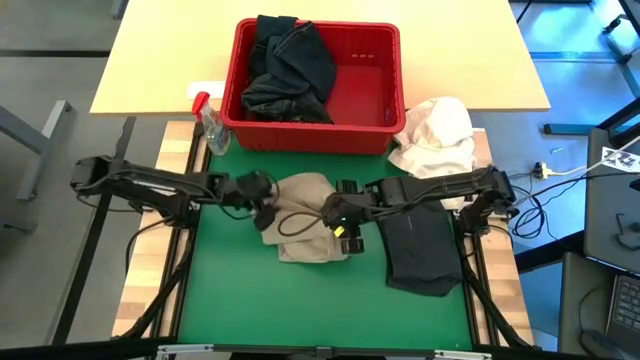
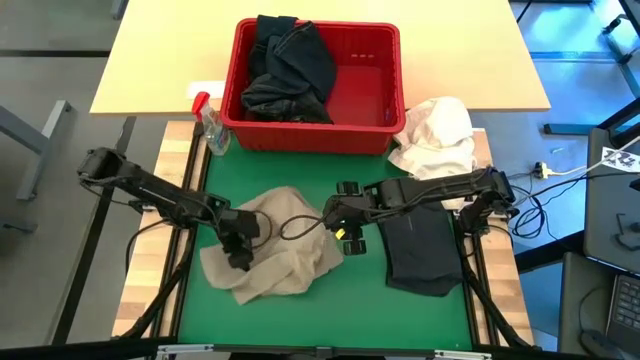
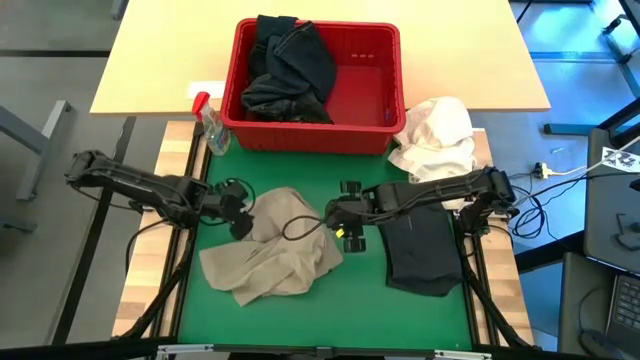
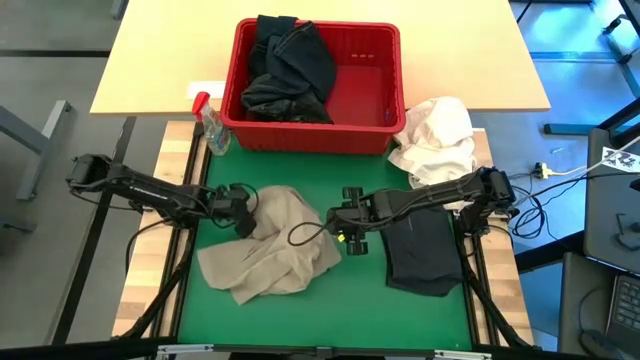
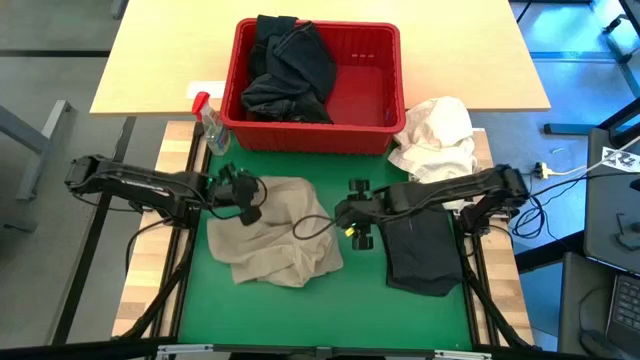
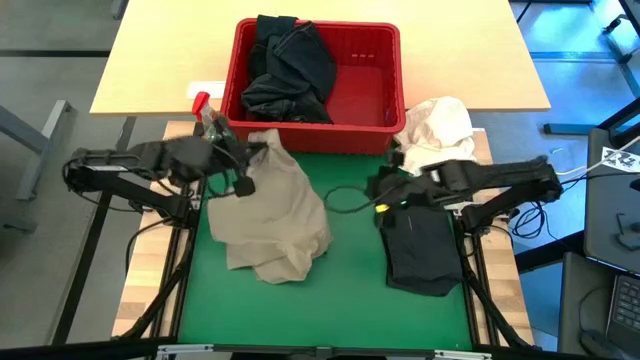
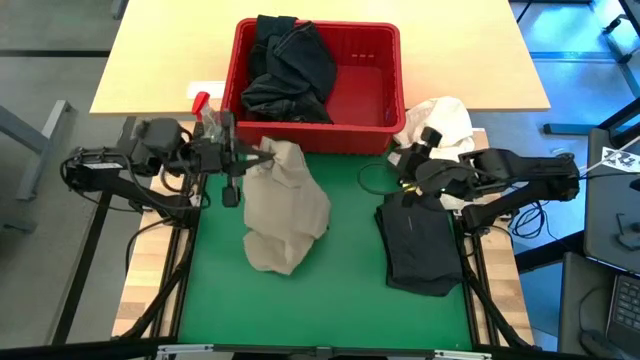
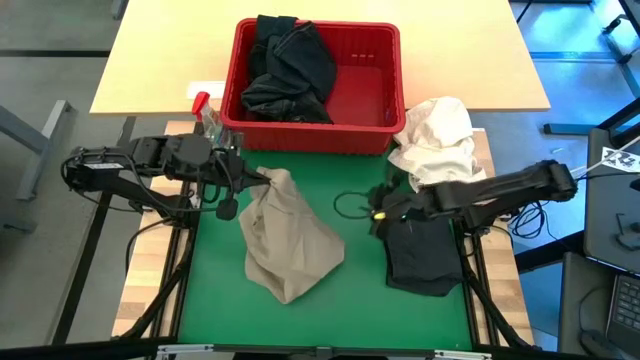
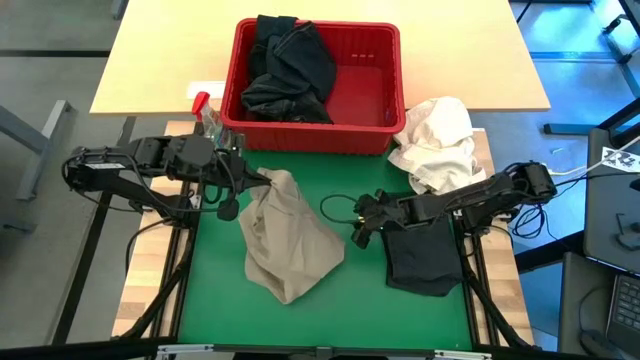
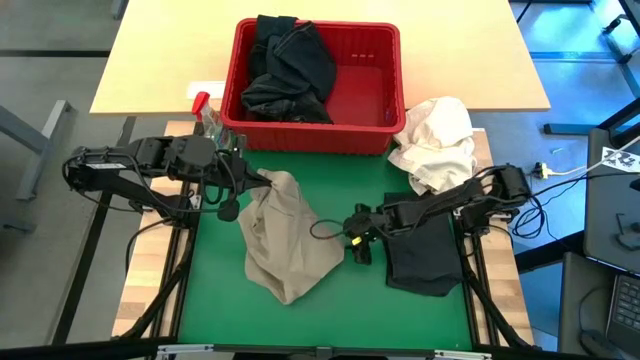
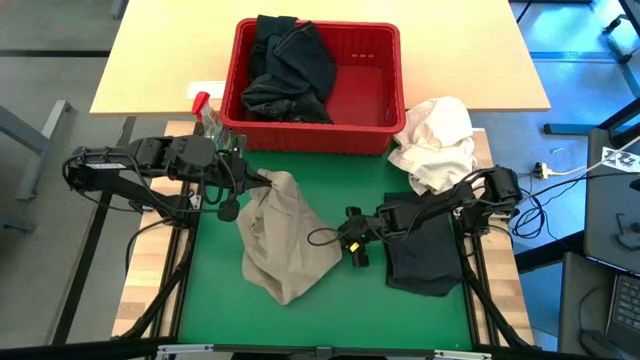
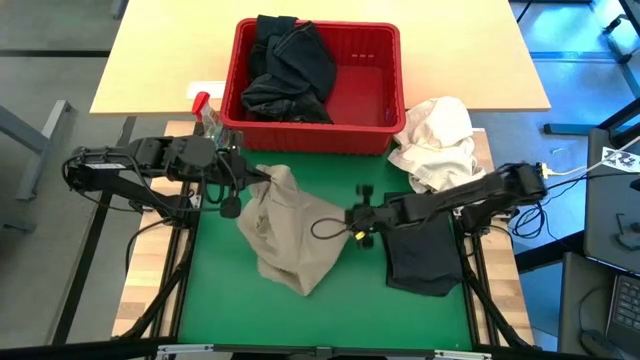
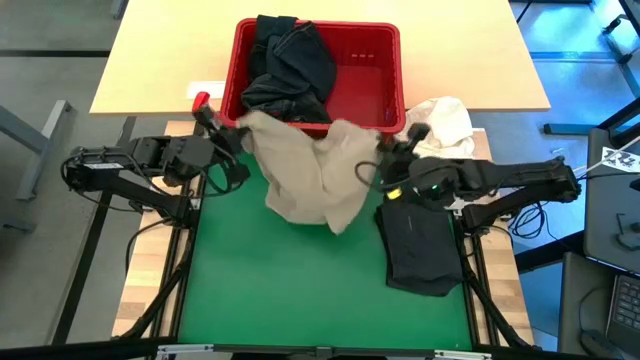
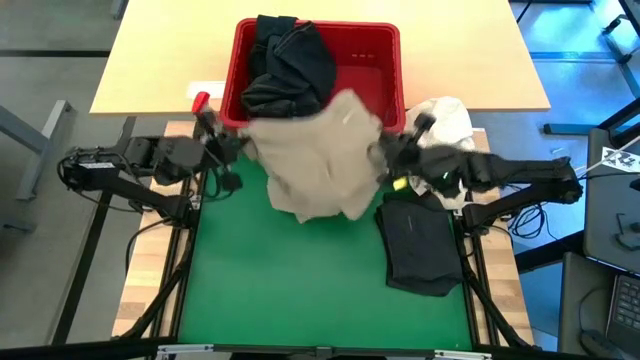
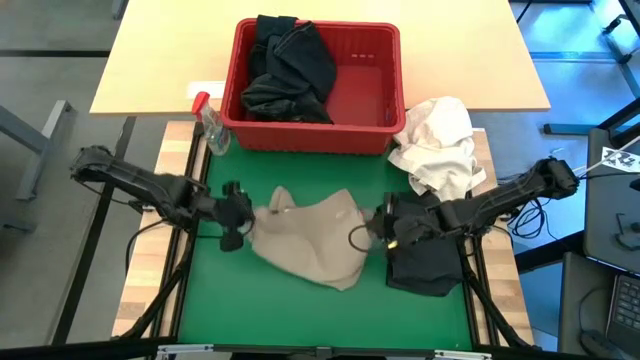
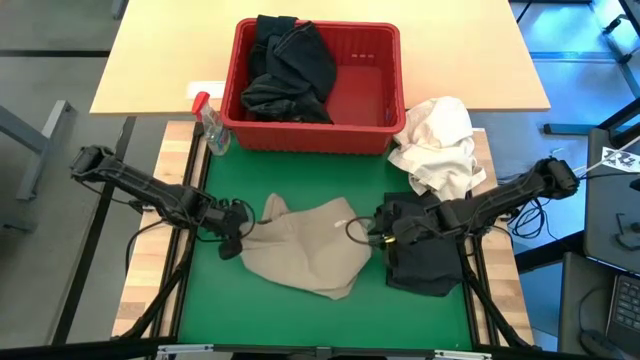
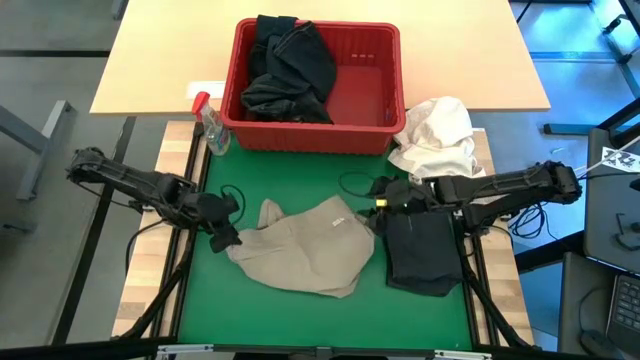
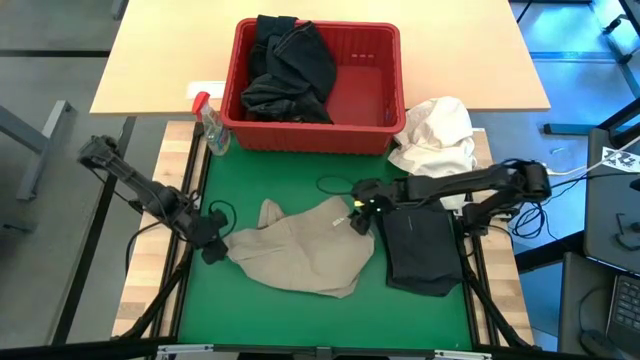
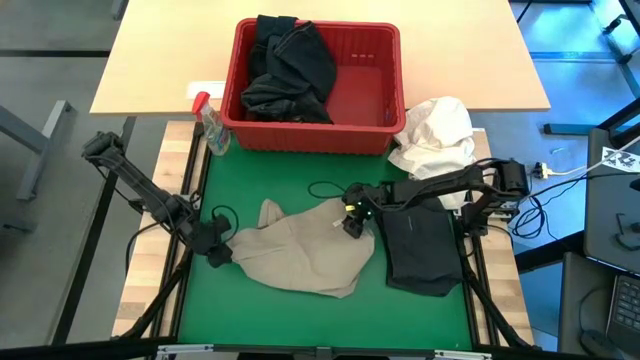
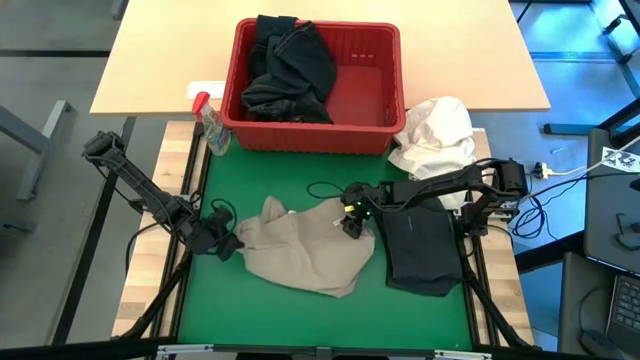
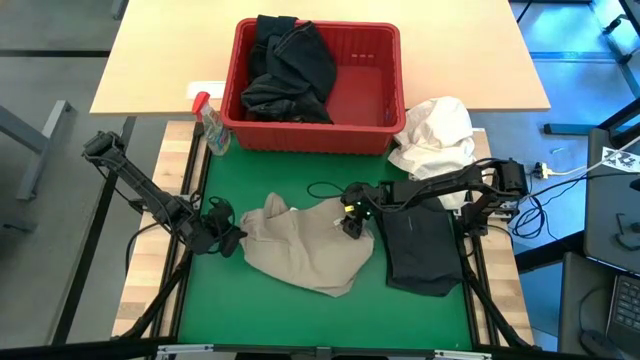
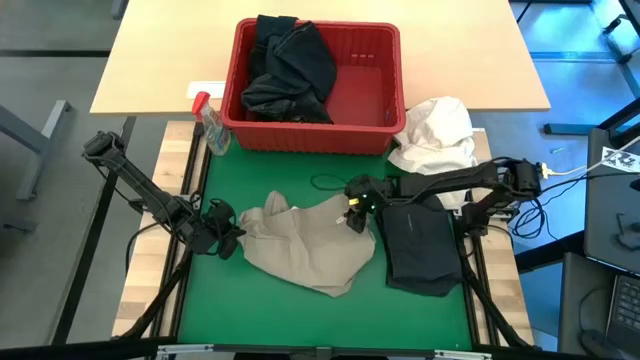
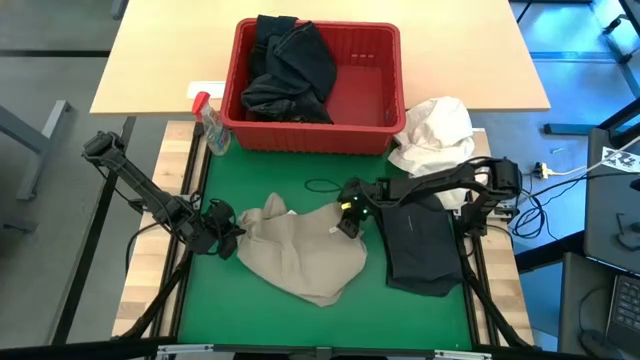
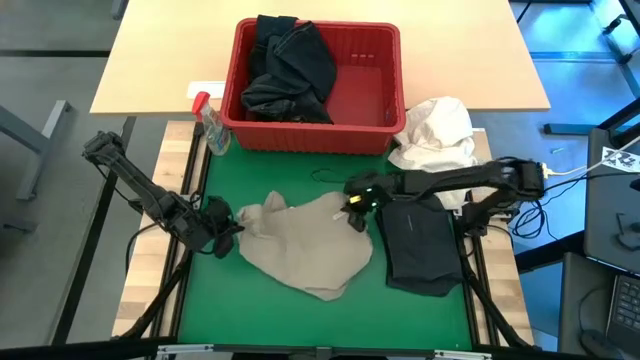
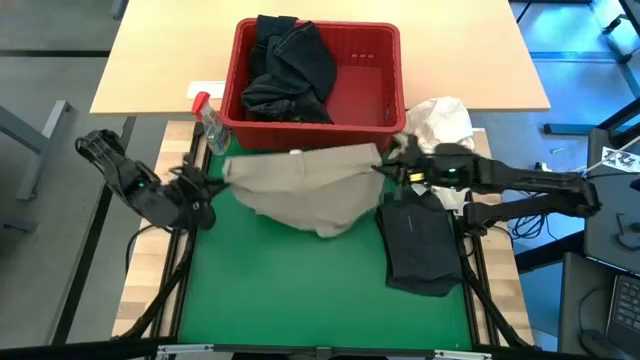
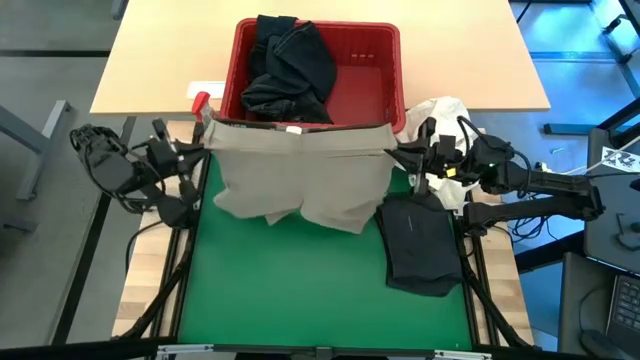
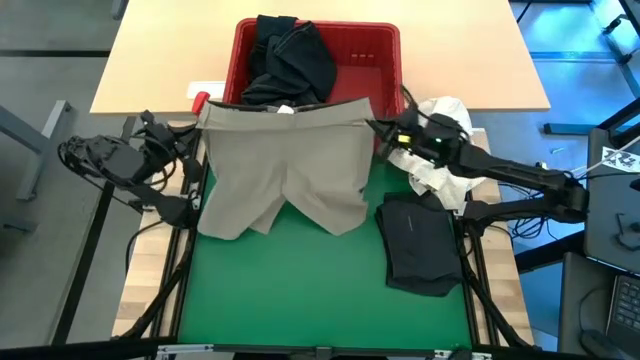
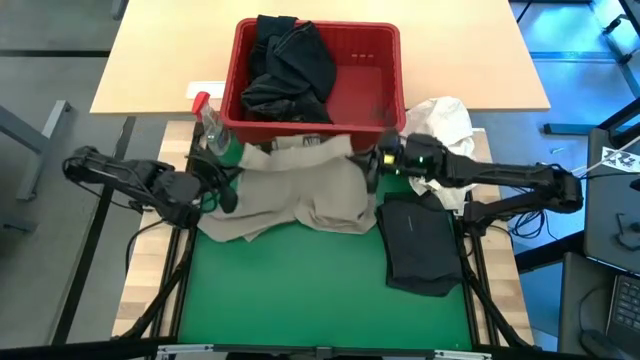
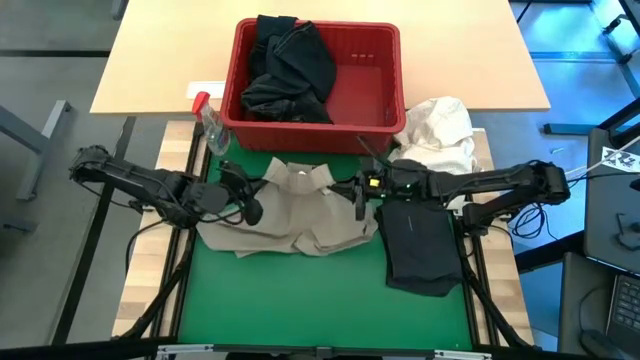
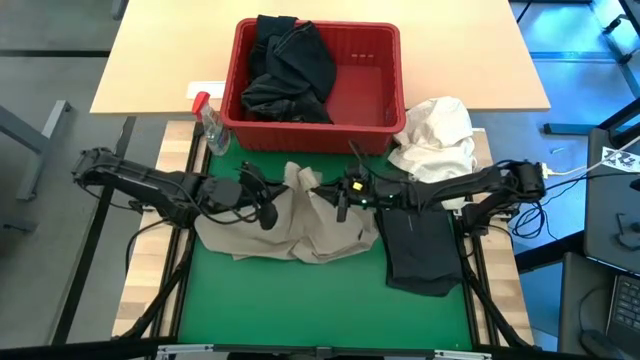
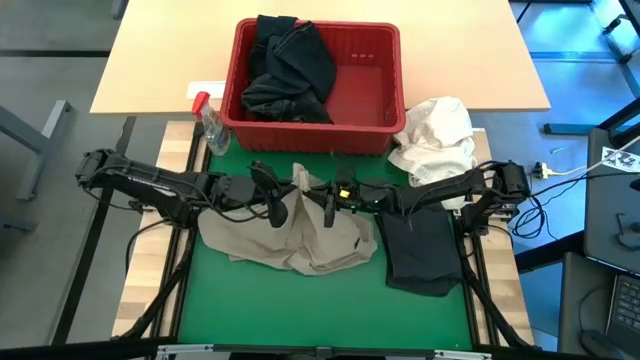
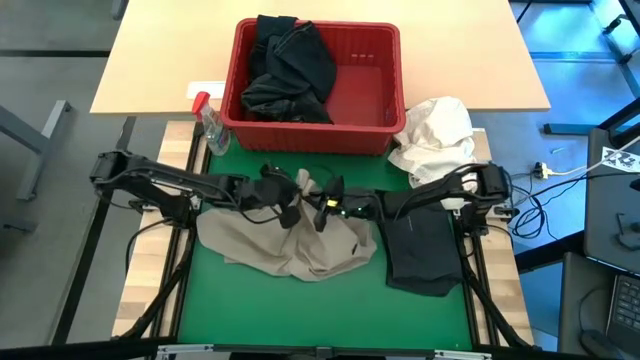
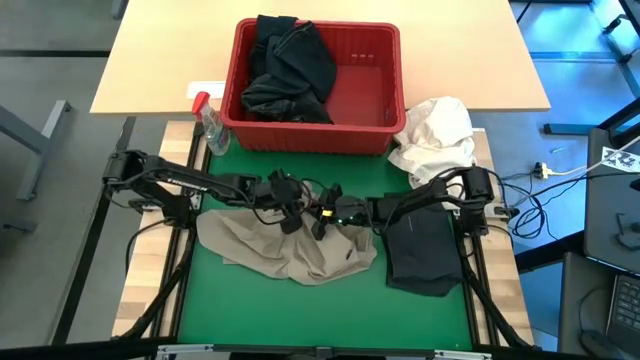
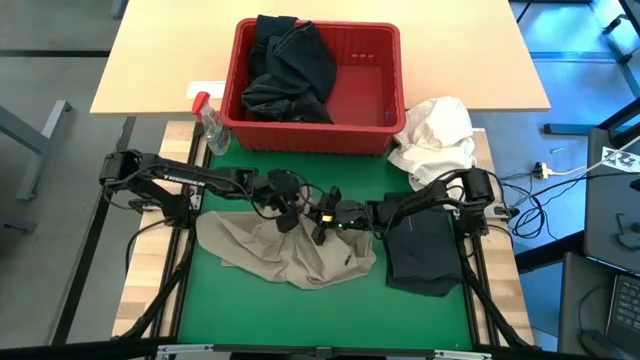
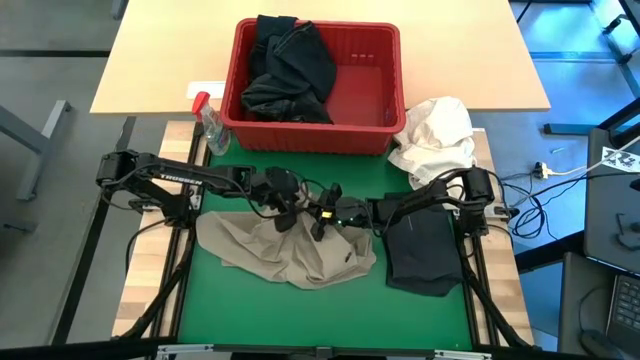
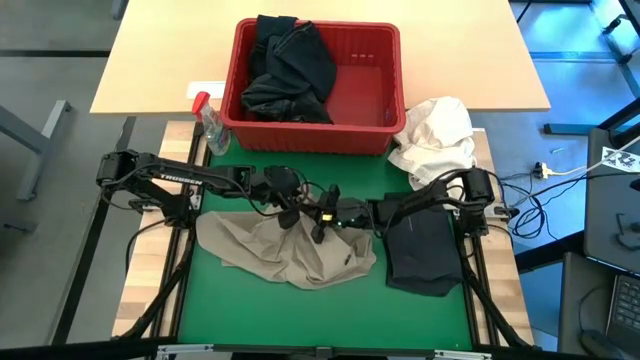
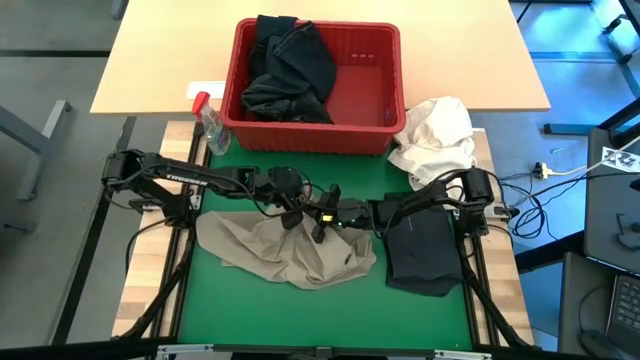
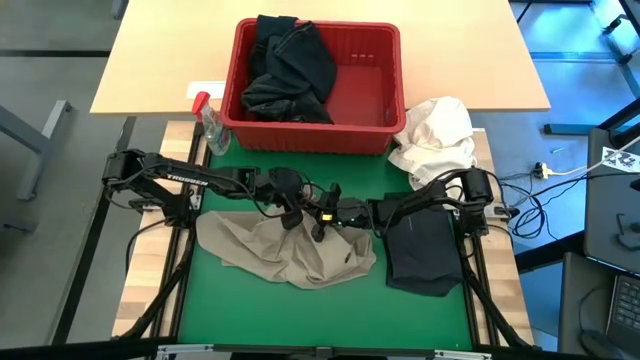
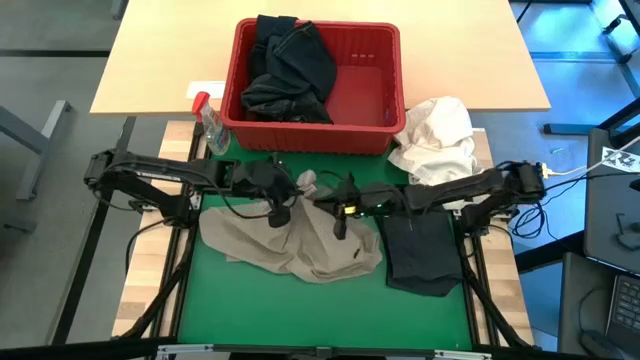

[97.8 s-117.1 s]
Task: Fold Laundry from Bin
Fold the brown shorts
